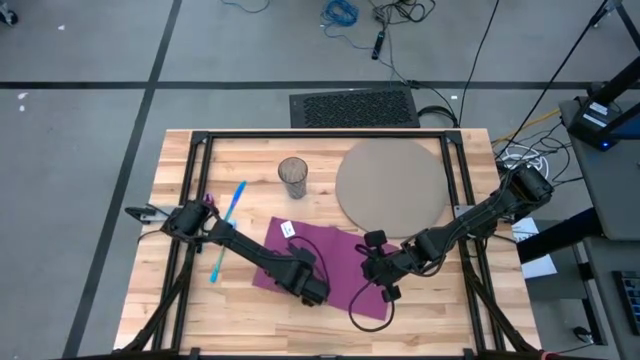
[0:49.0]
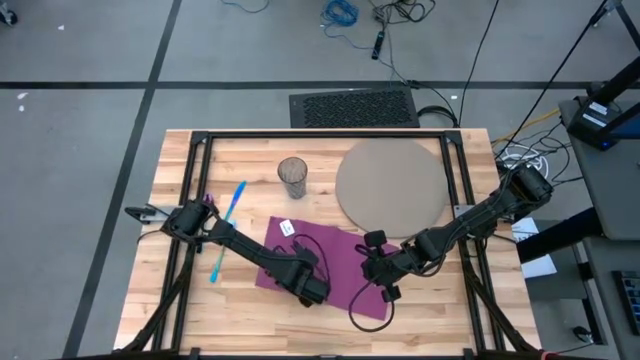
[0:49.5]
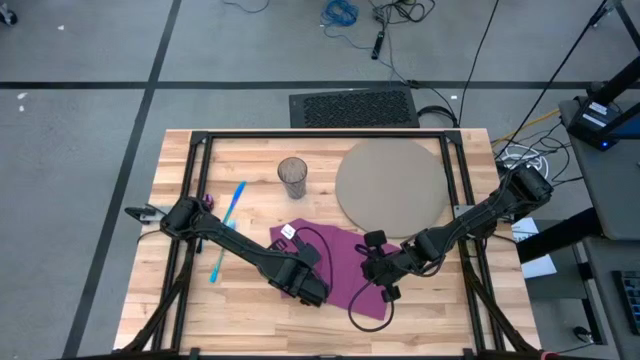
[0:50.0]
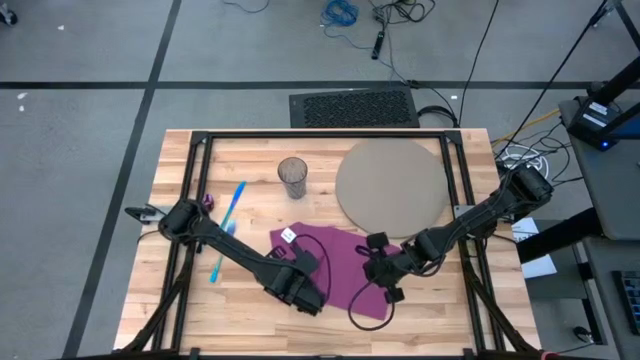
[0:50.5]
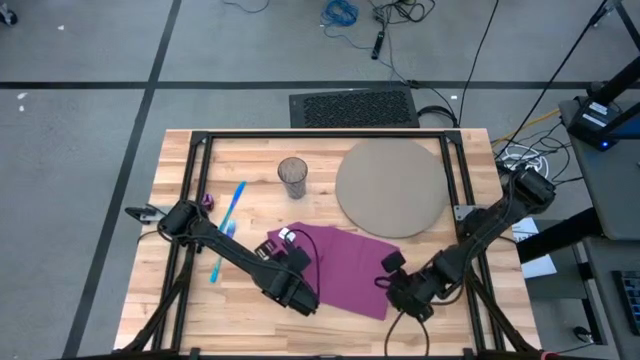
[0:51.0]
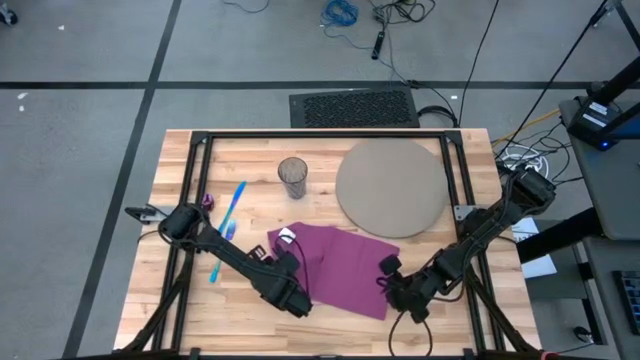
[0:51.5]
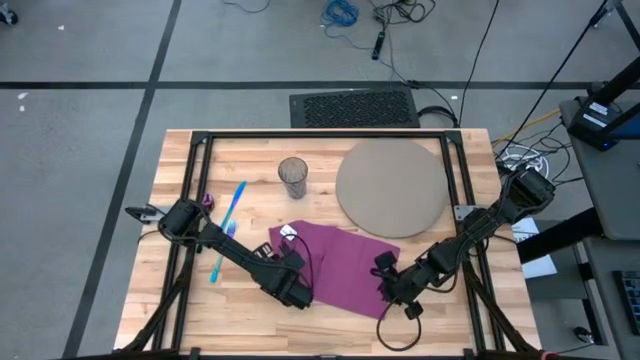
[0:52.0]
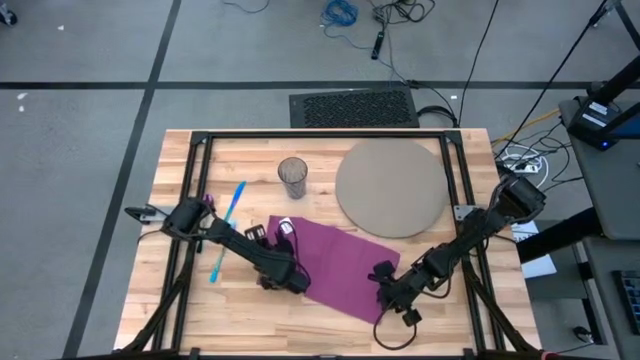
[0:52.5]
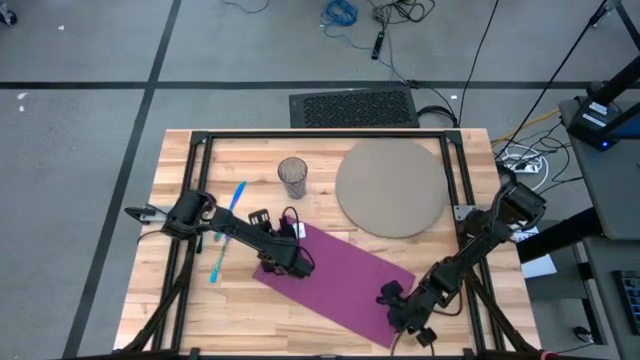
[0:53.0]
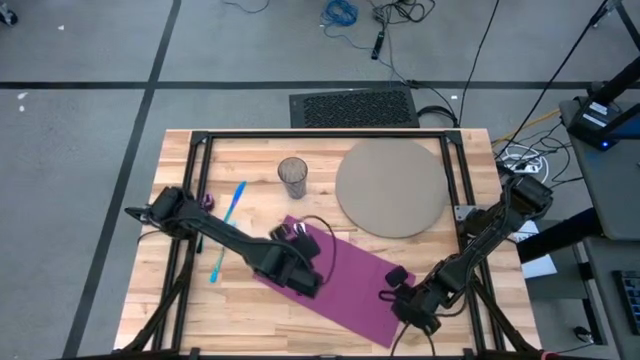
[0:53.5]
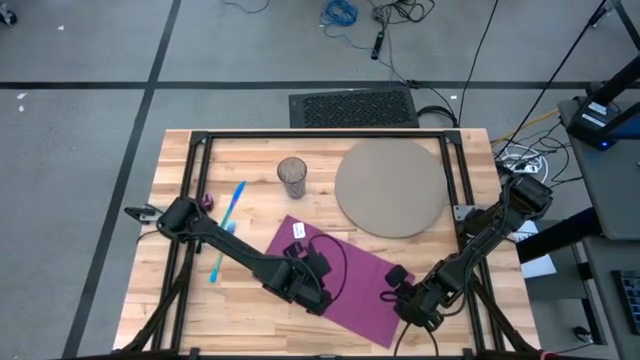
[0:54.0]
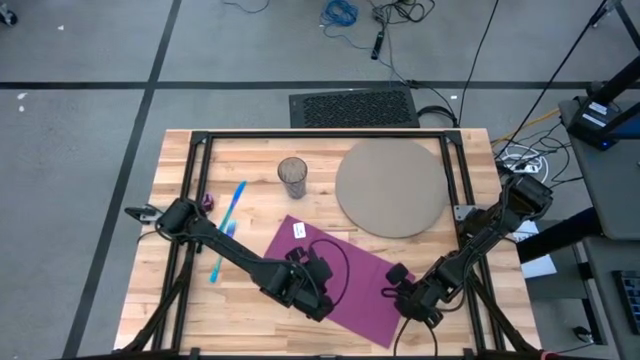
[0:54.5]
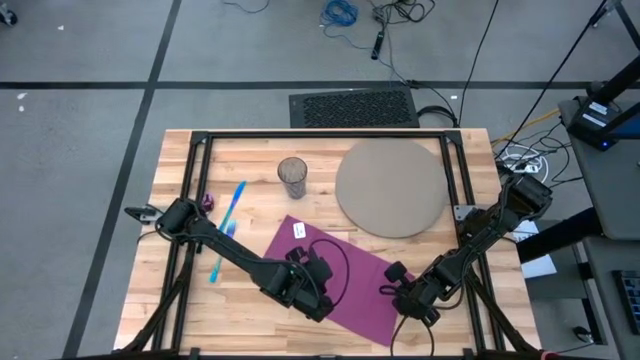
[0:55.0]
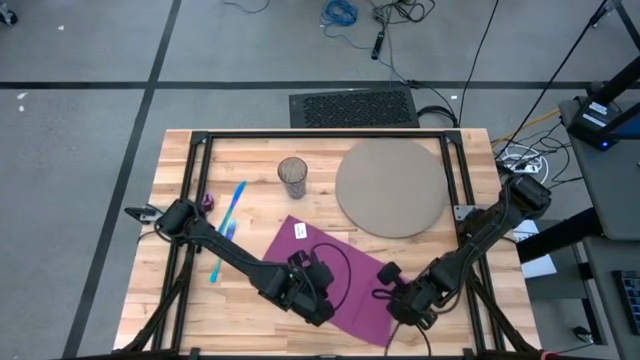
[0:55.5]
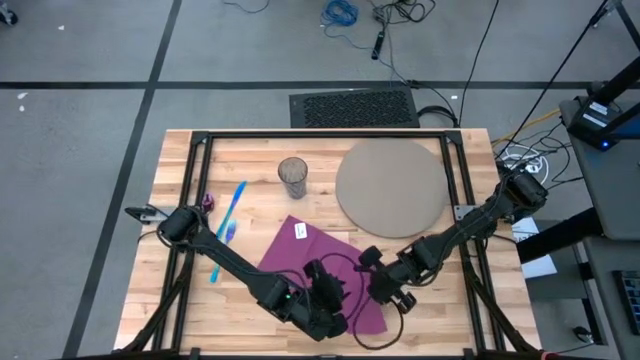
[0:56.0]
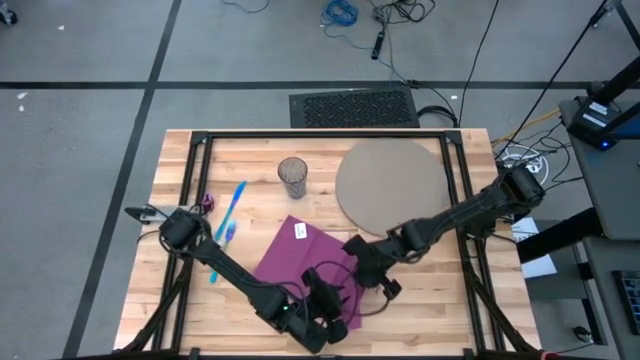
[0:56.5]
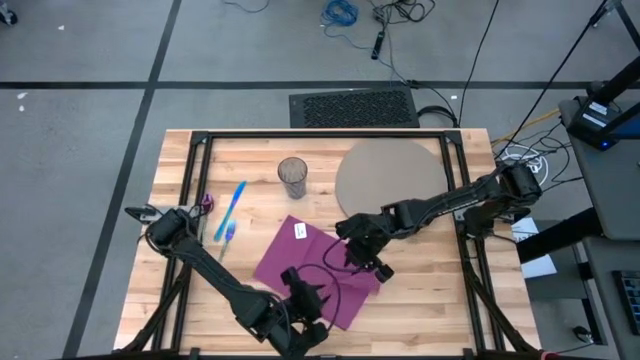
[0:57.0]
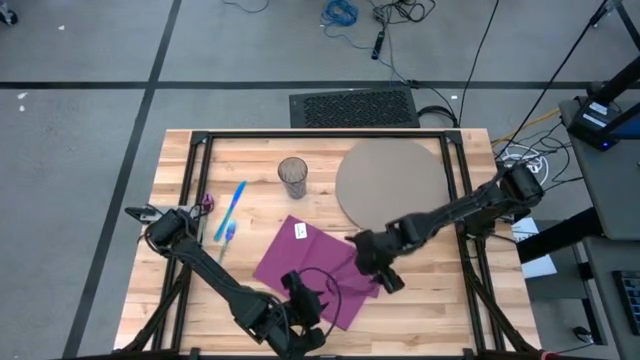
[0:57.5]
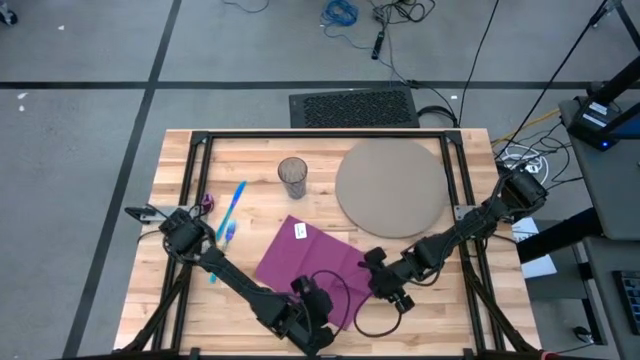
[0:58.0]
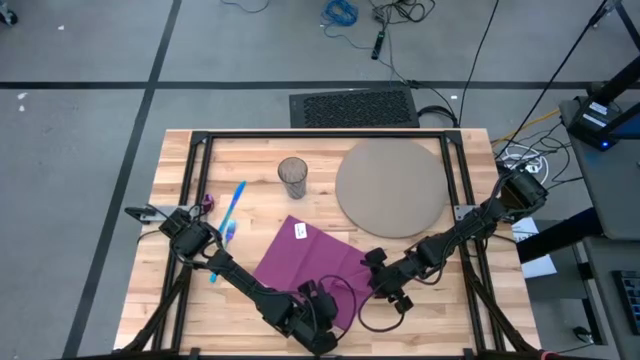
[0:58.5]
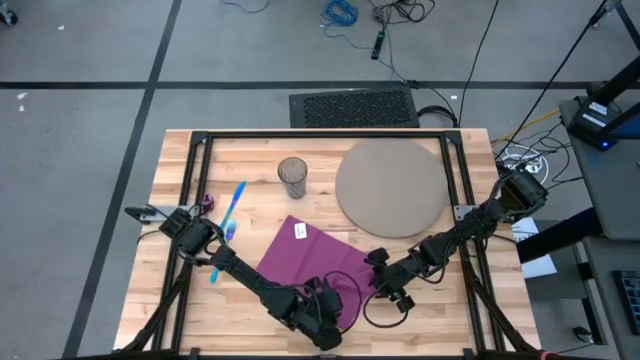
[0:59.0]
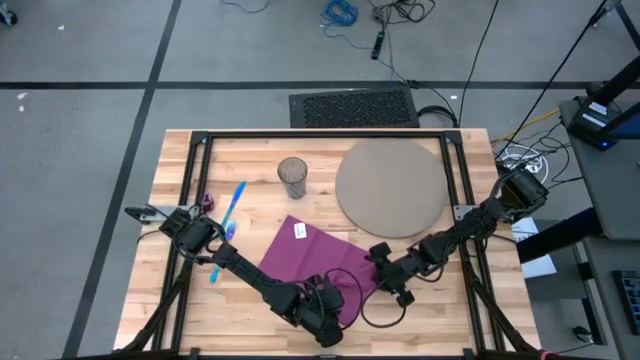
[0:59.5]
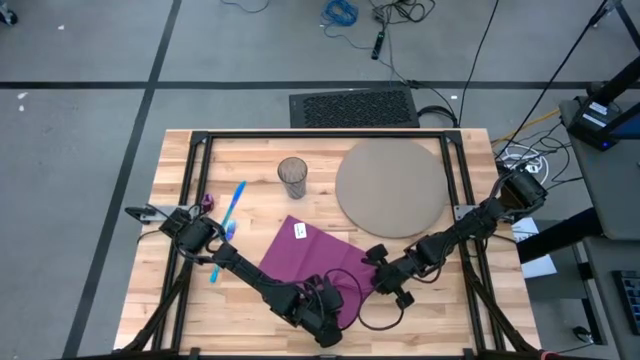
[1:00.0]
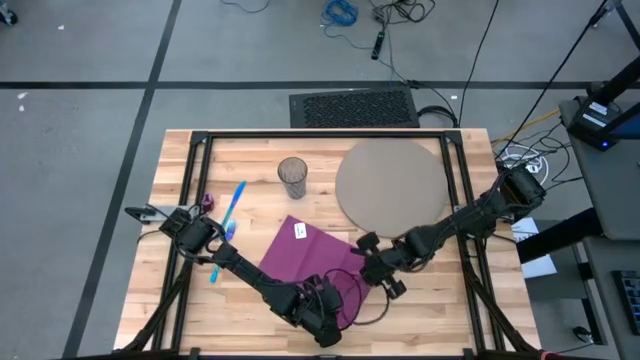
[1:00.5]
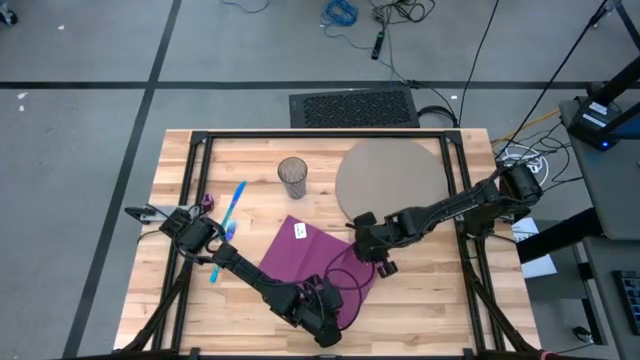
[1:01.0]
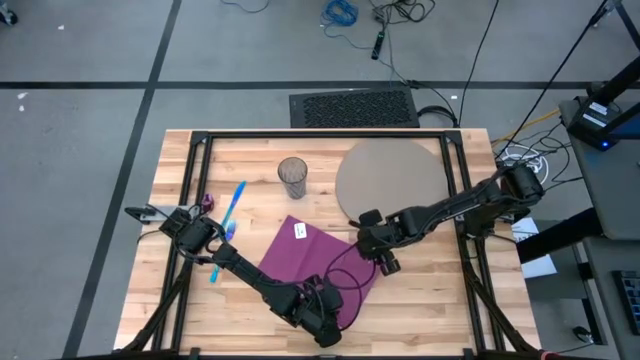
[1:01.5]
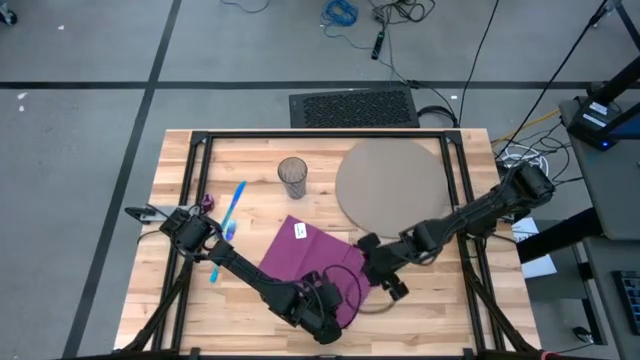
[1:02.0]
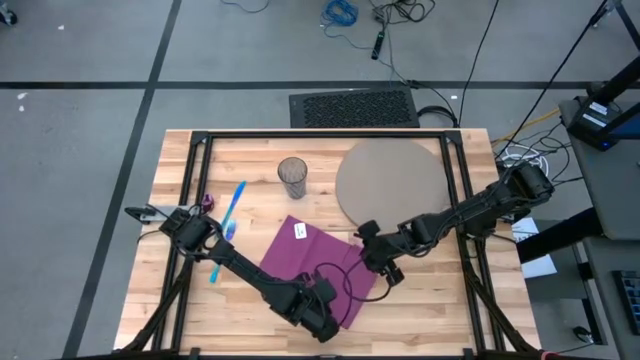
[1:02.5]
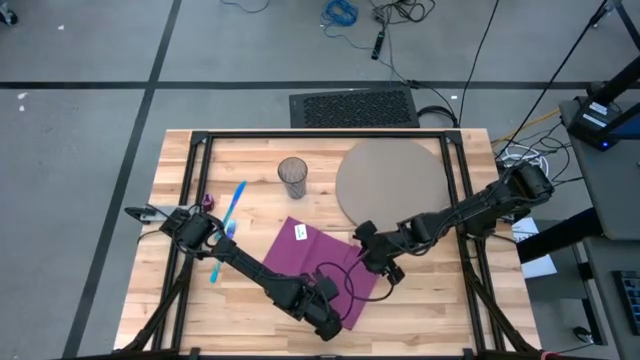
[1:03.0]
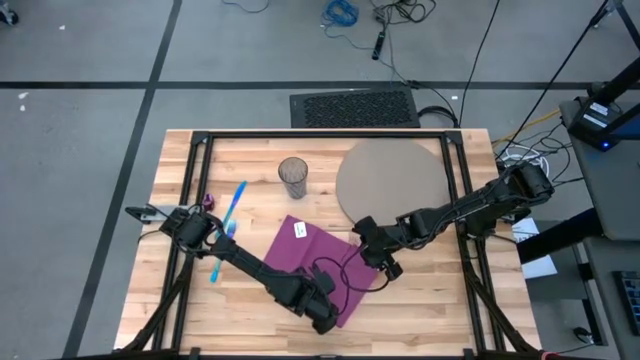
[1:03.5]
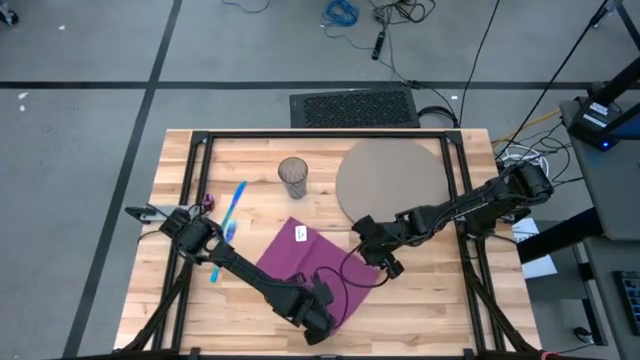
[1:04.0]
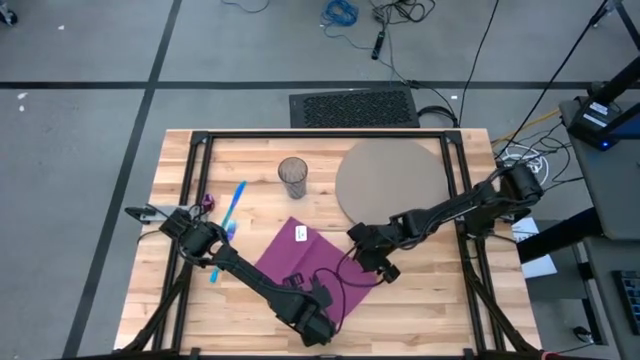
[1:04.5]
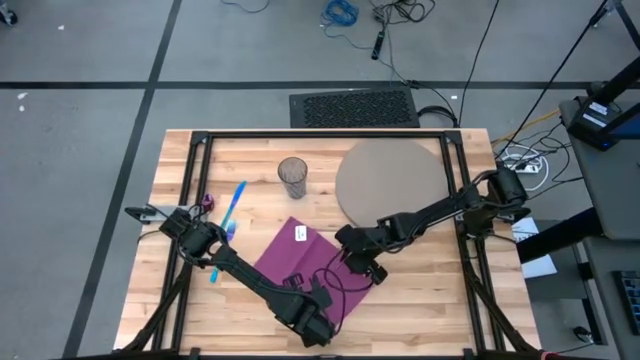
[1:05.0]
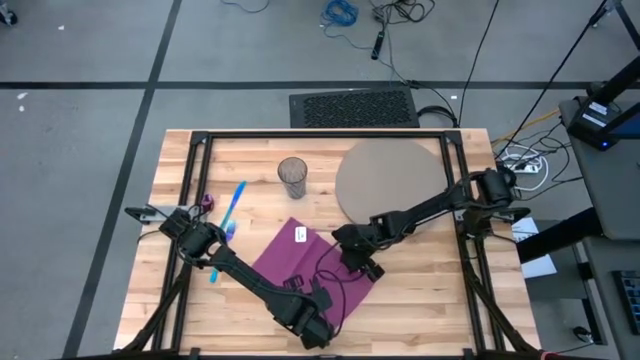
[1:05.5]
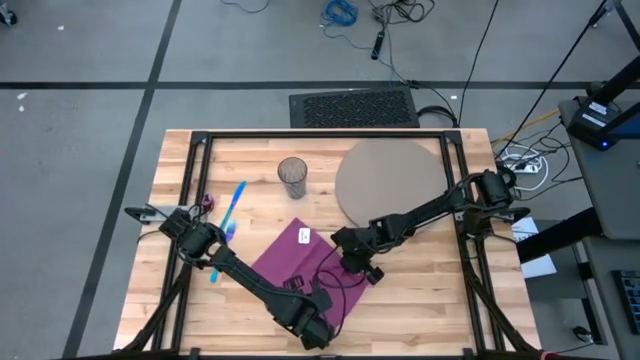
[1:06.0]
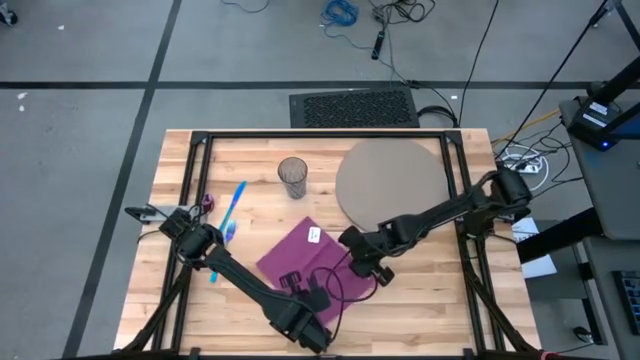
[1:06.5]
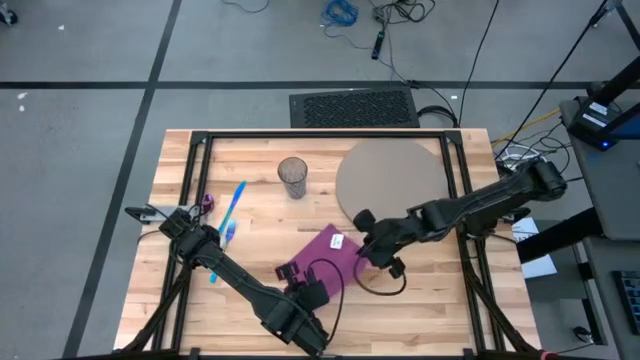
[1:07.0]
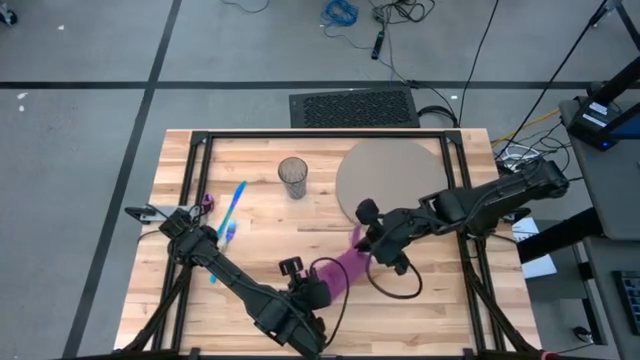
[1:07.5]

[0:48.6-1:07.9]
Task: Set table place
Fold the pink table napkin

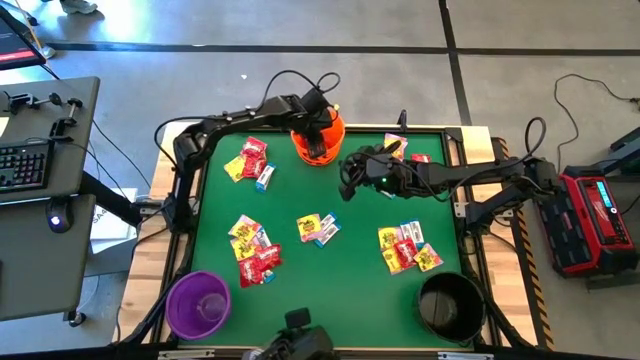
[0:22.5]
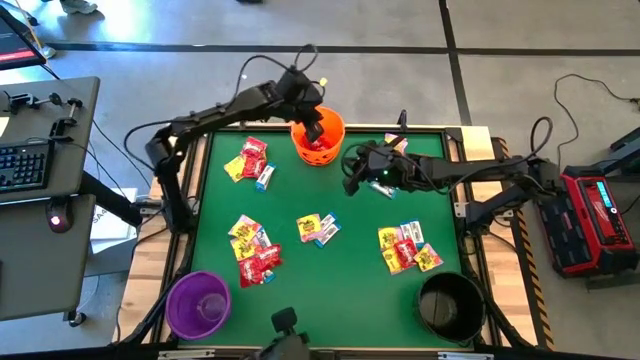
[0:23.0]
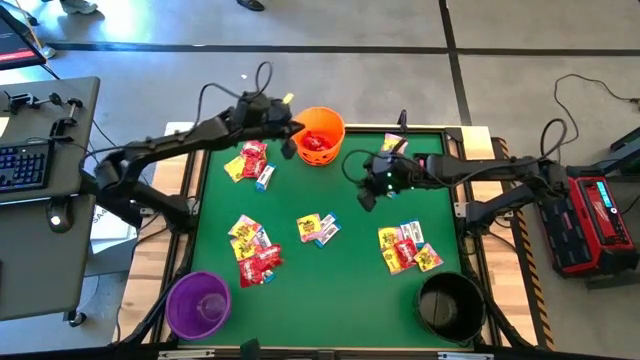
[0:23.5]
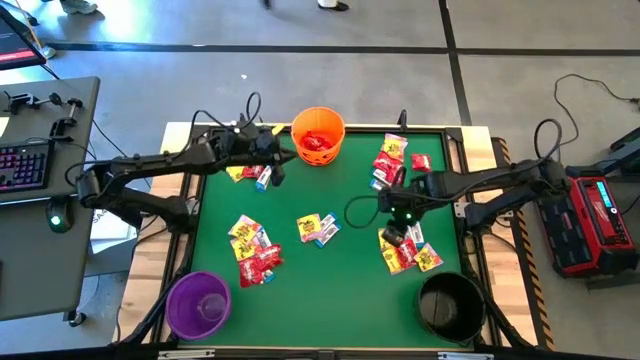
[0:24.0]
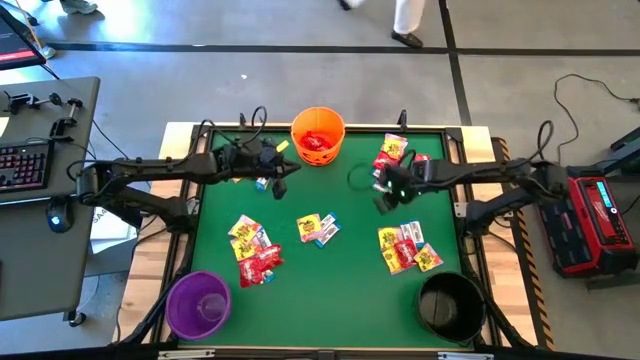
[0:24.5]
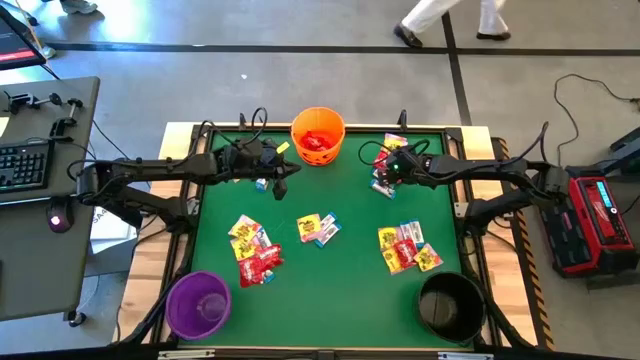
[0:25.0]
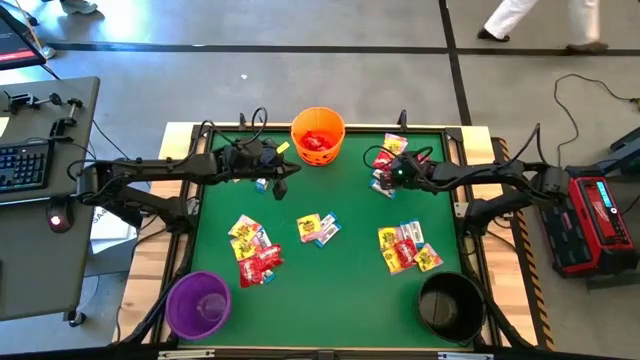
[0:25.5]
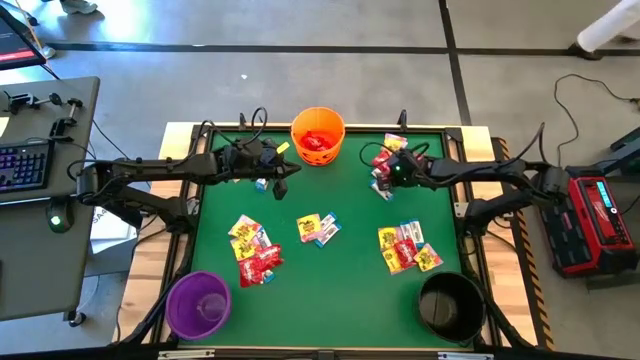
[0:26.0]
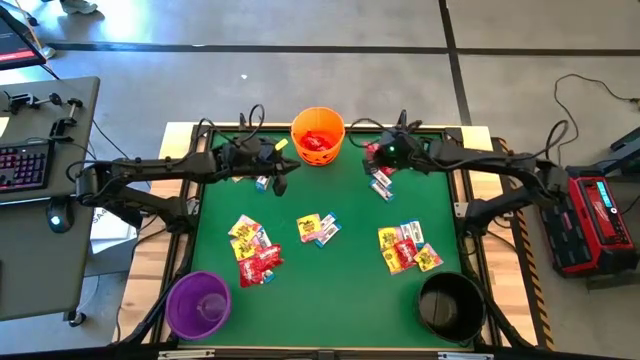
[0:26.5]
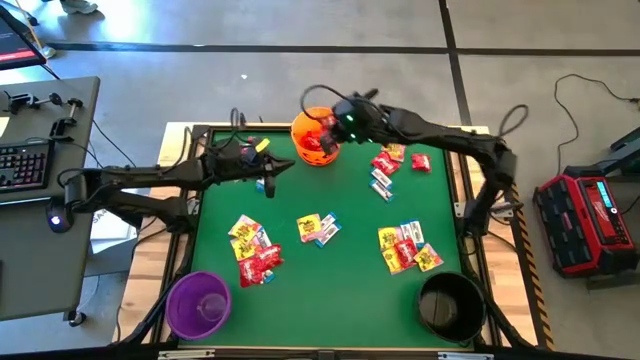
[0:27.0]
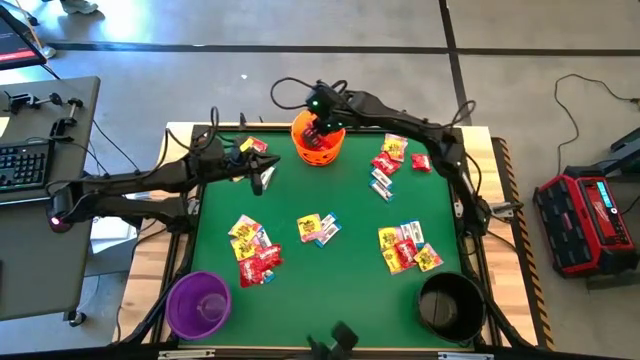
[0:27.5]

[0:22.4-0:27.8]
Task: Sort candy by brand, put in halloween buckets
Put the red candy into the orange bucket
